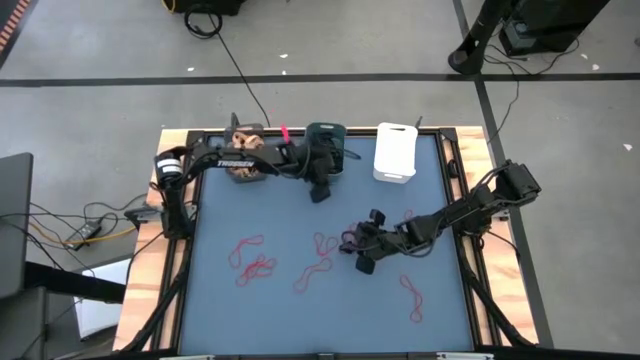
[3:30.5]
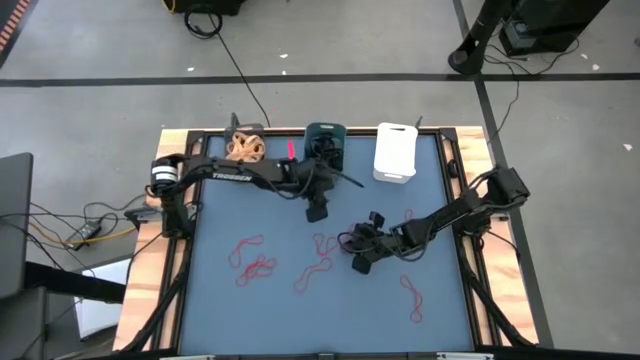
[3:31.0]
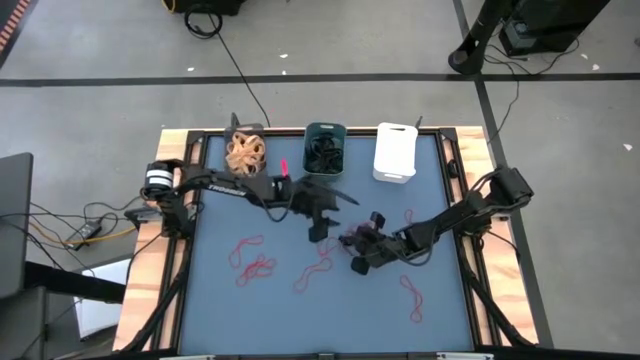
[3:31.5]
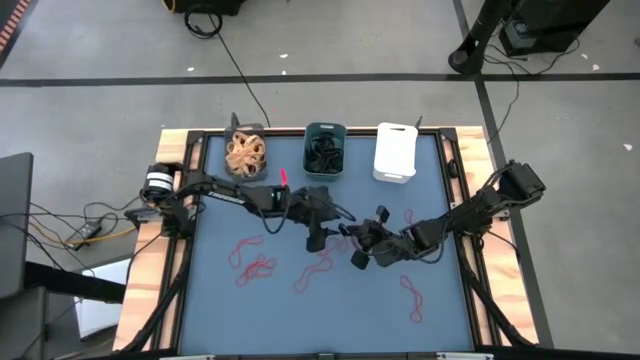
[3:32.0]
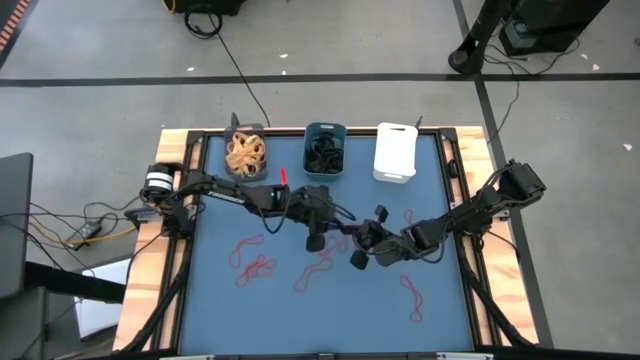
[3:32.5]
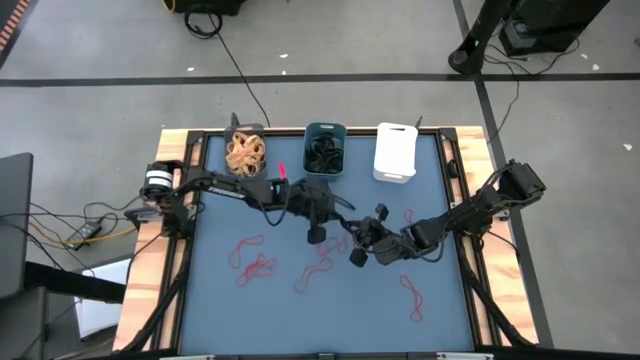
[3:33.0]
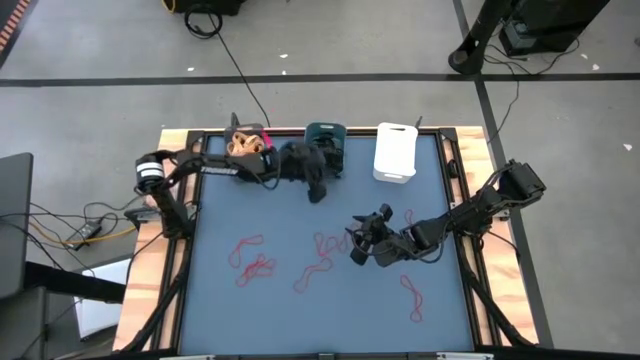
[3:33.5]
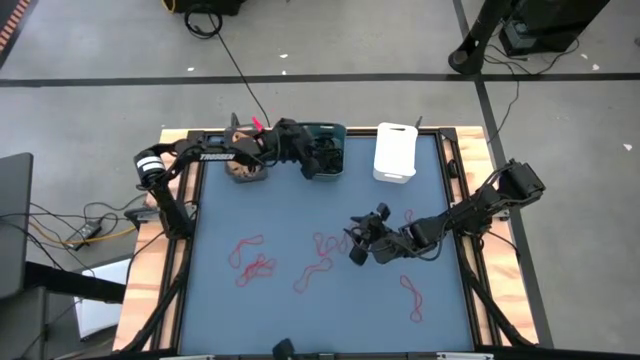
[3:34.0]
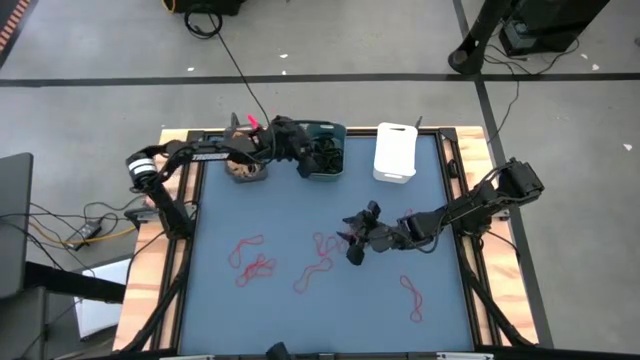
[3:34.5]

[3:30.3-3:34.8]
Task: Sort rubber bands into baskets
Put the black rubber band into the blue bin

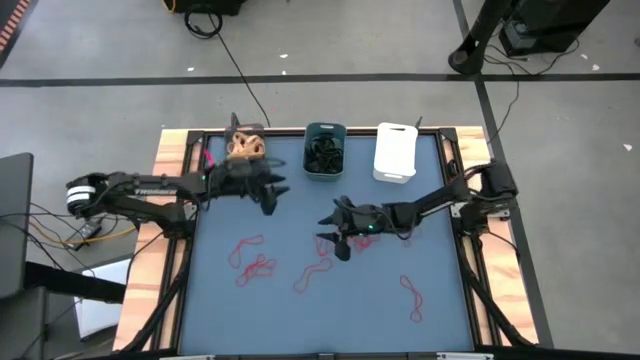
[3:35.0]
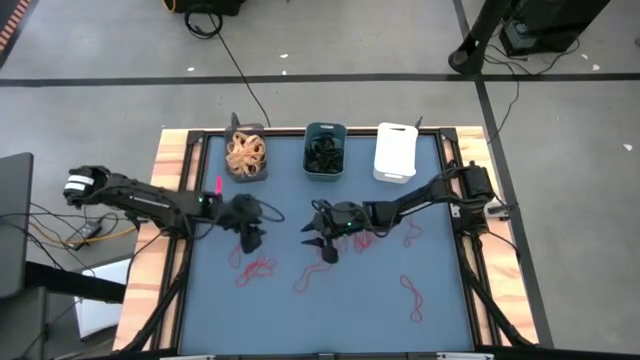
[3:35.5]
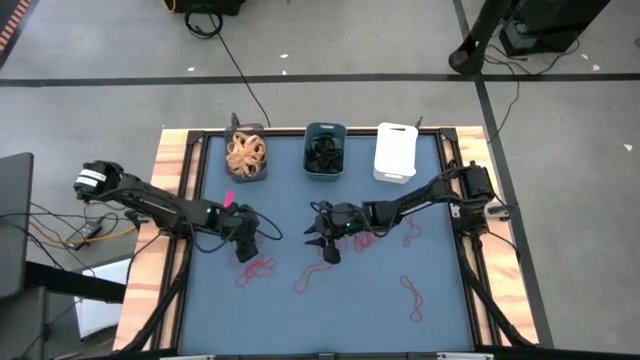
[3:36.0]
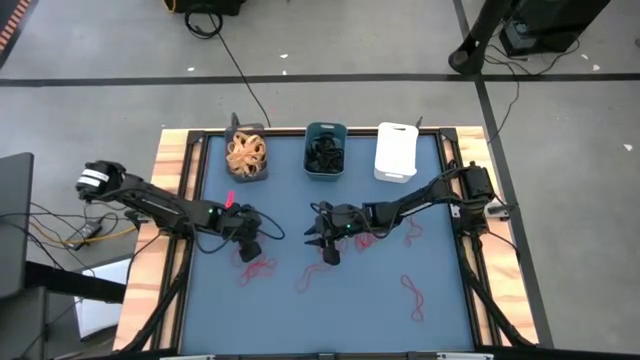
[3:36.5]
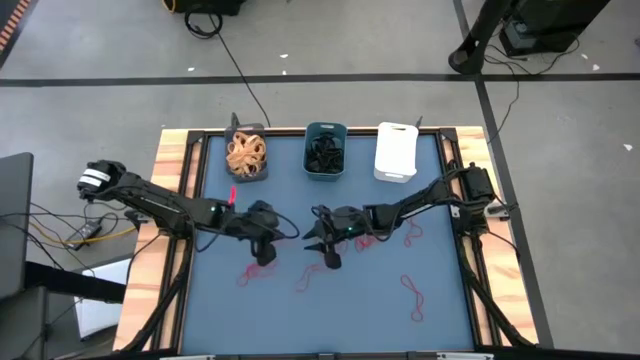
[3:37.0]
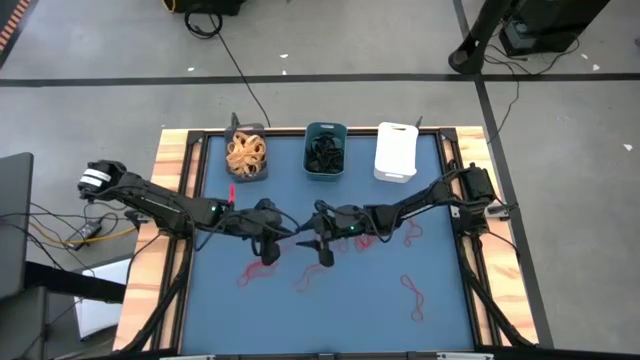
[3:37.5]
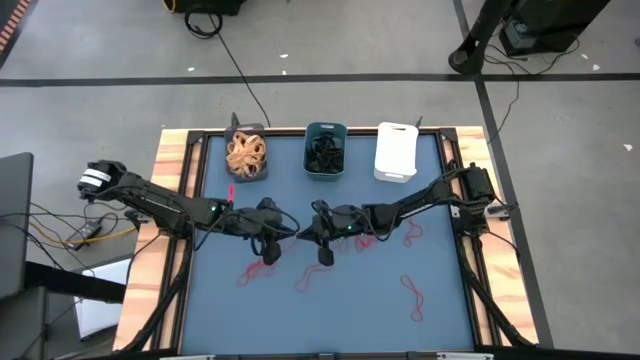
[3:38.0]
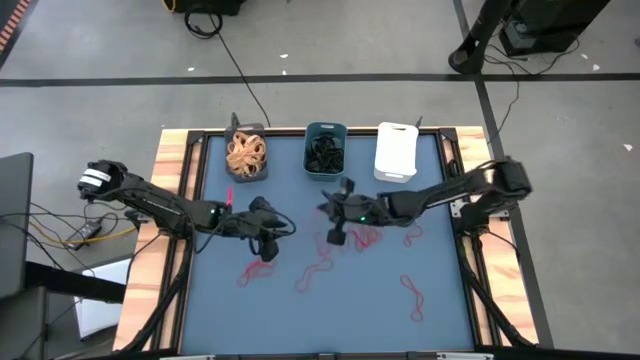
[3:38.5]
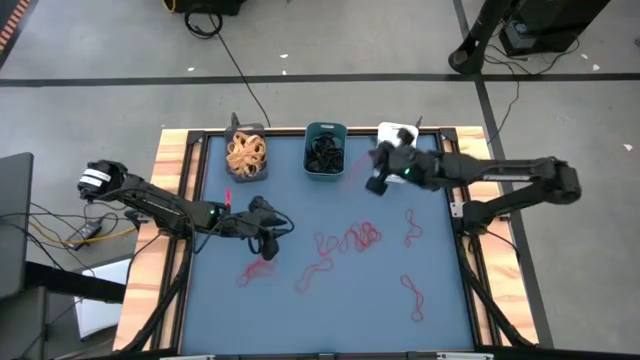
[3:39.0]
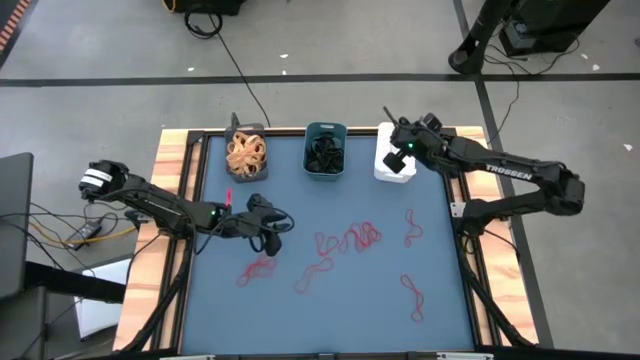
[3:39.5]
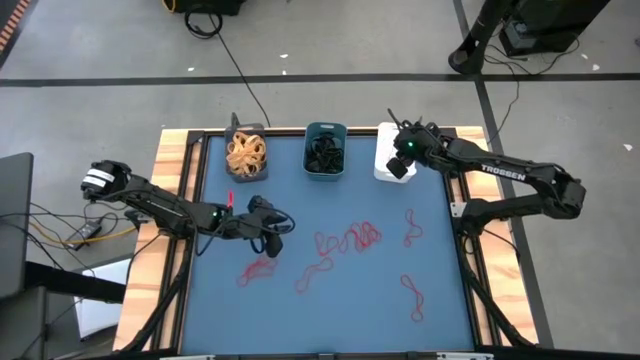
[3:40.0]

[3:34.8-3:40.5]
Put the red rubber band into the white bin

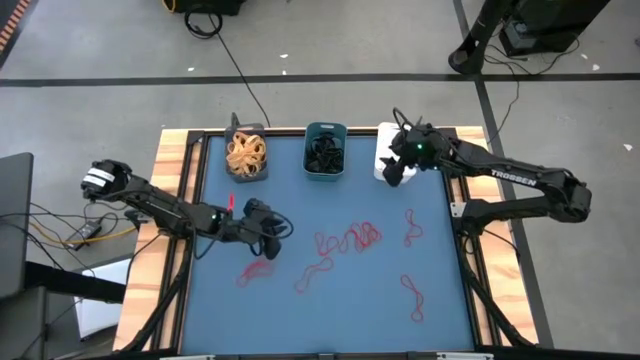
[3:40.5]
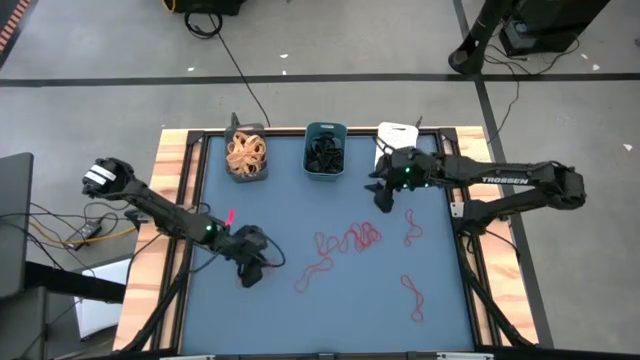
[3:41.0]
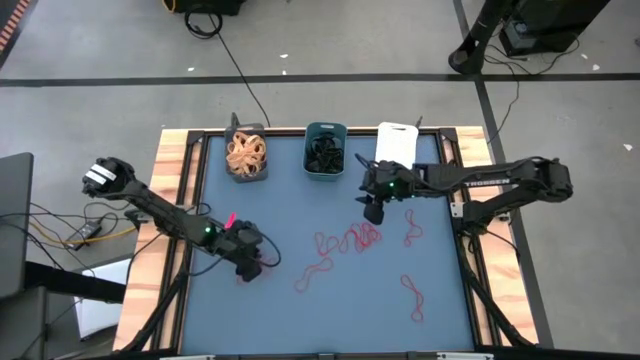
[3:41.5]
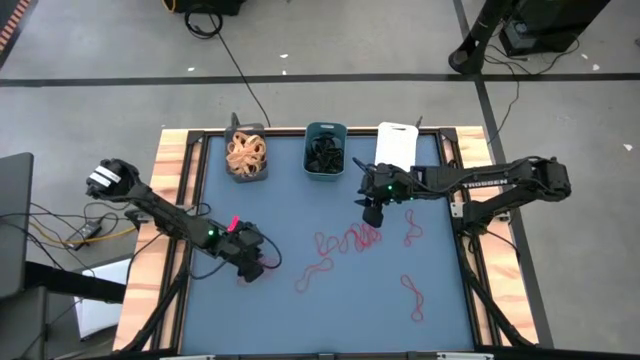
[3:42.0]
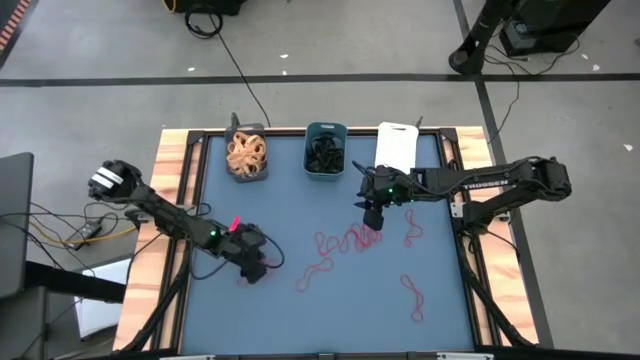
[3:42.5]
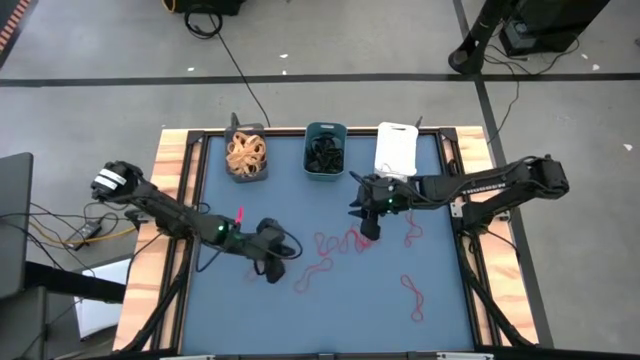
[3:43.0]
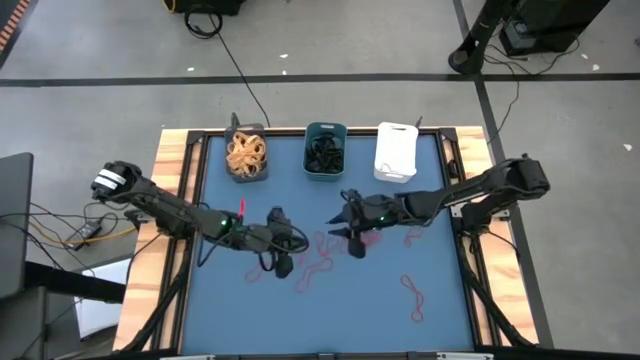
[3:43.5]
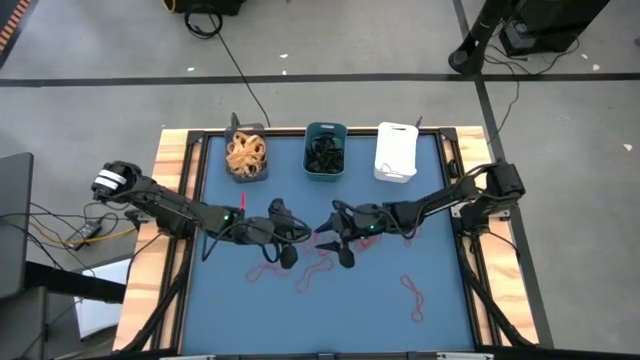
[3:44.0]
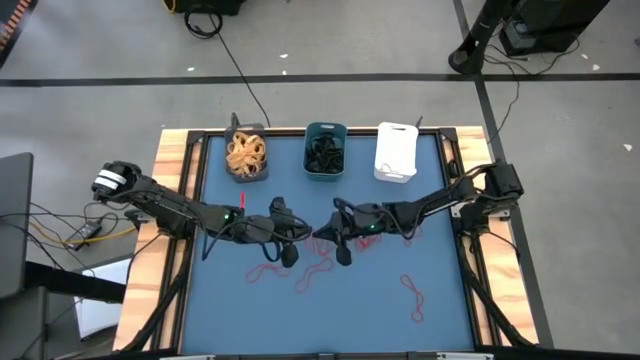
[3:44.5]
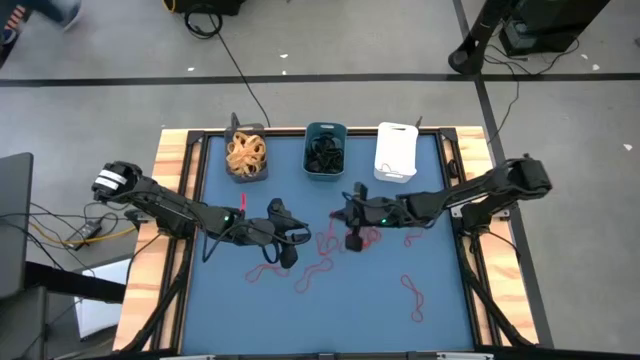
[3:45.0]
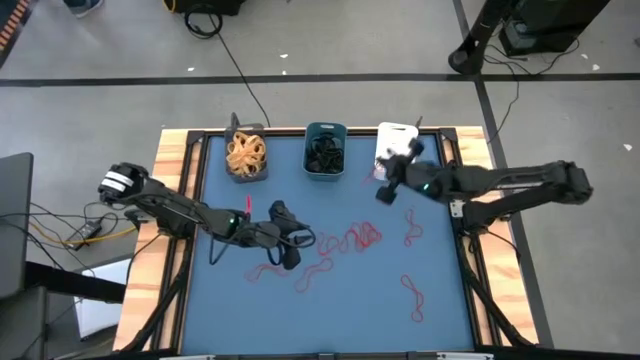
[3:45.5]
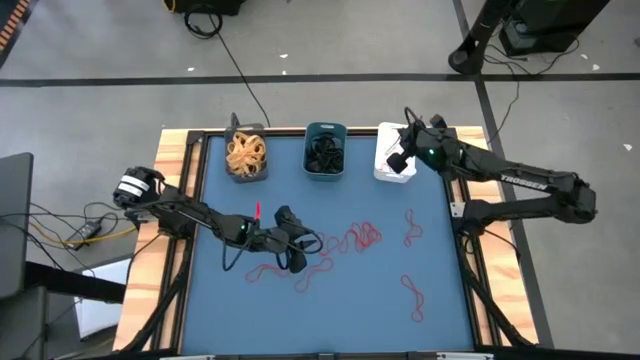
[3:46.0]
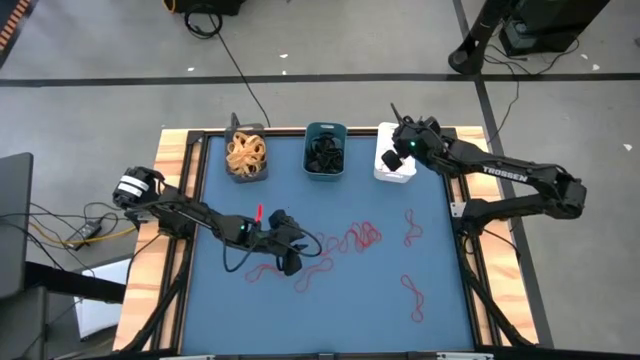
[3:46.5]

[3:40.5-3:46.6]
Put the red rubber band into the white bin

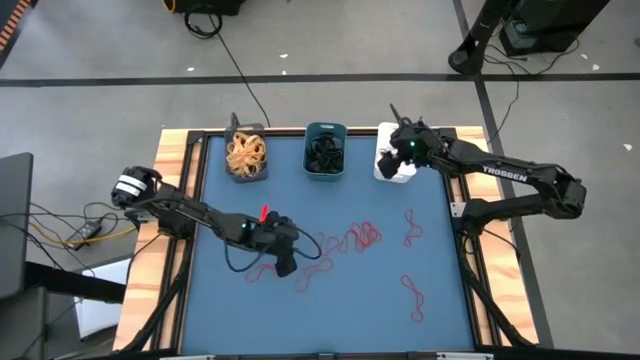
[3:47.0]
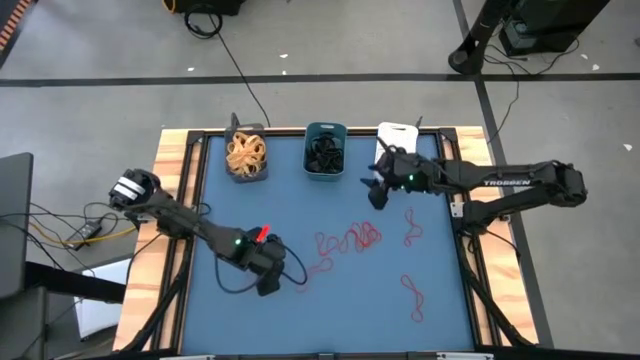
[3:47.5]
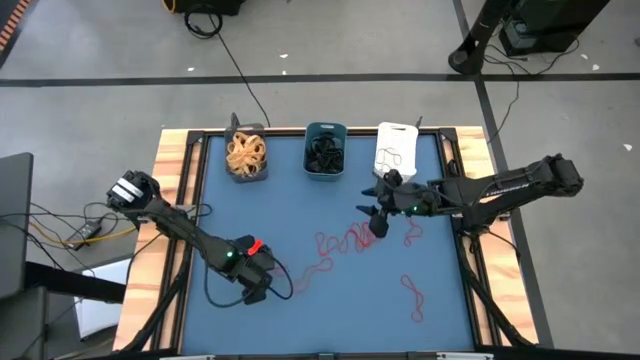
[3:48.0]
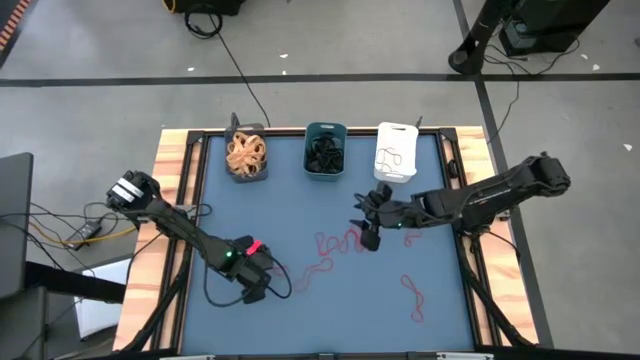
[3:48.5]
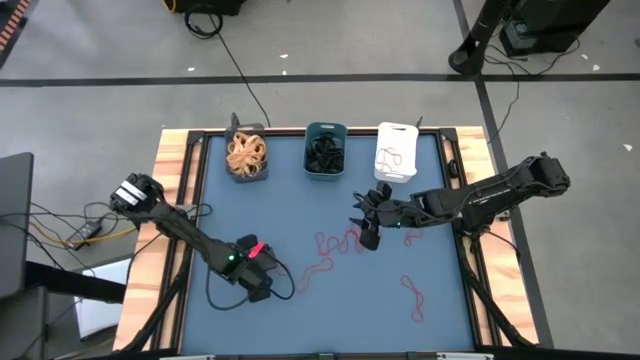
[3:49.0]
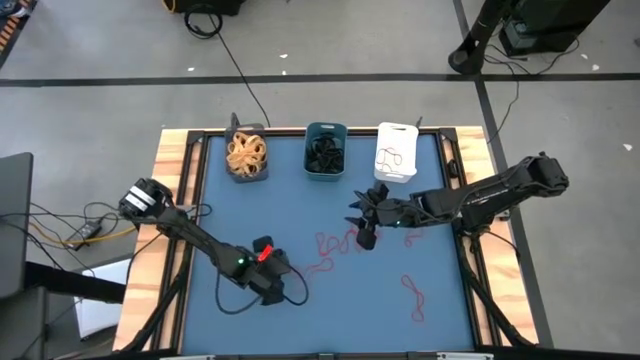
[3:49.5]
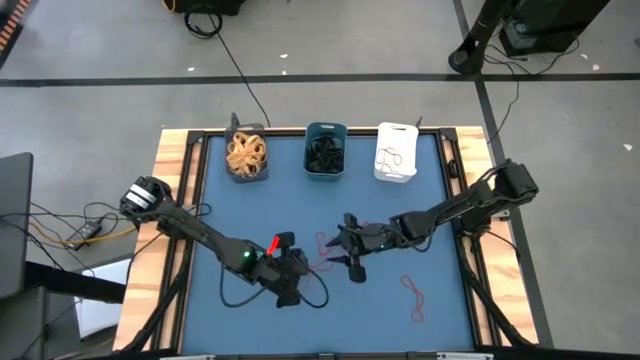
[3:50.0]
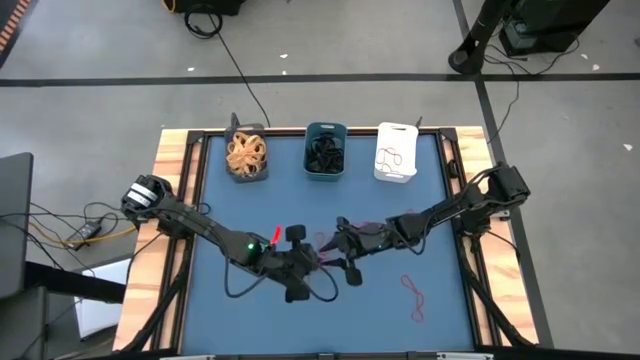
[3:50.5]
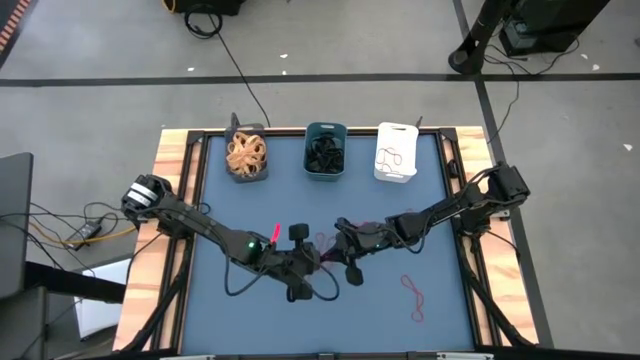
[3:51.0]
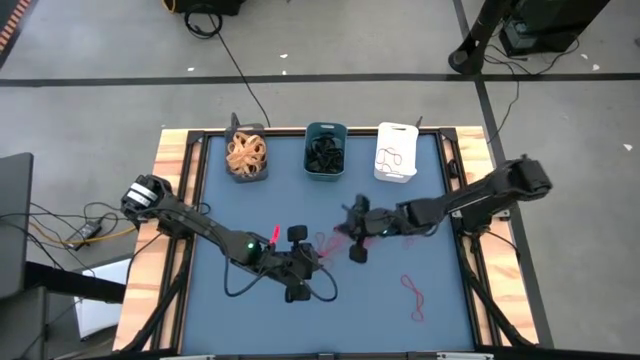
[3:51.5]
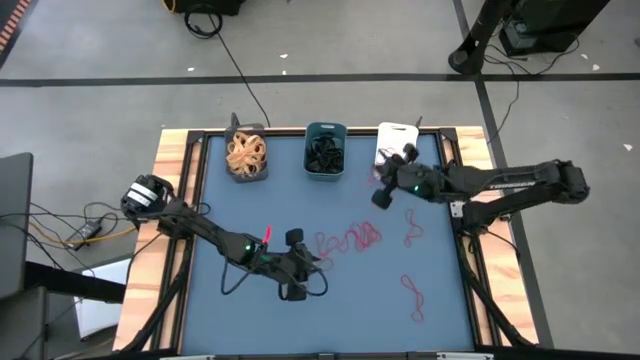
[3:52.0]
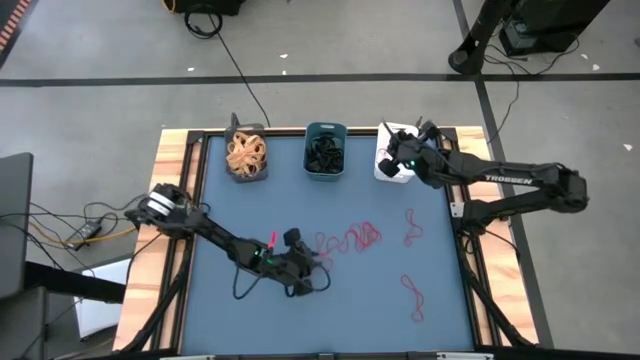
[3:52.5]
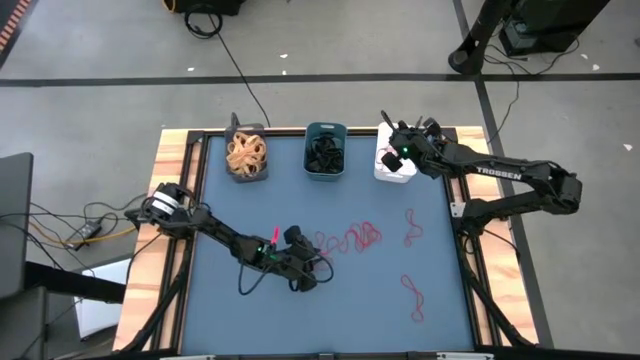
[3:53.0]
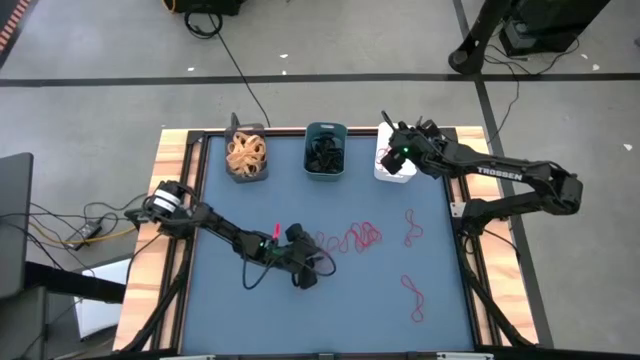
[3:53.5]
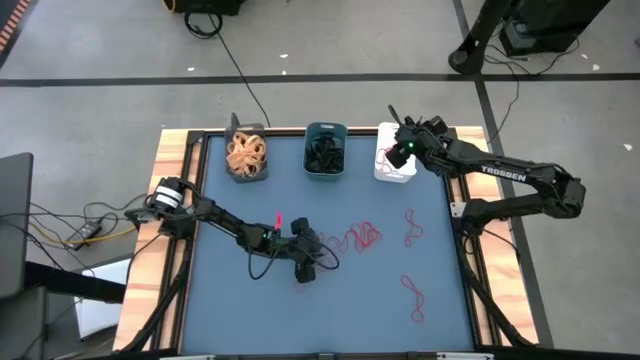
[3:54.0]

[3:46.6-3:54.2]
Put the red rubber band into the white bin
